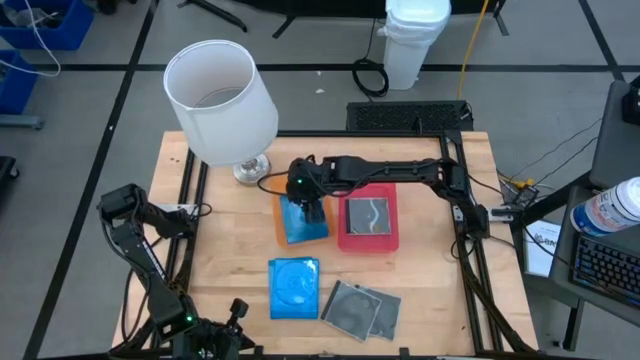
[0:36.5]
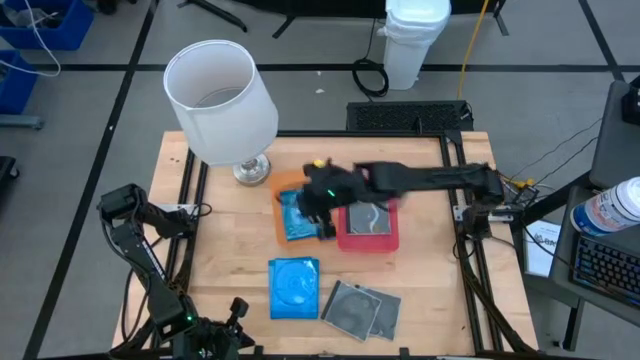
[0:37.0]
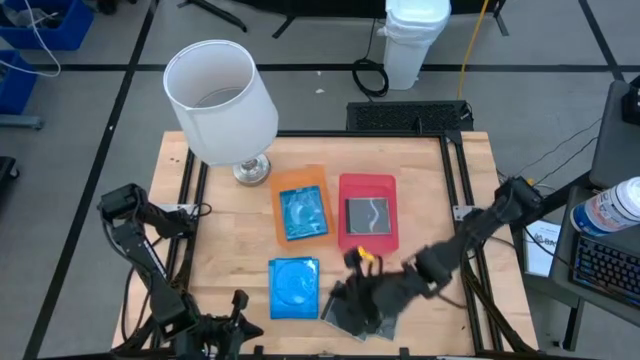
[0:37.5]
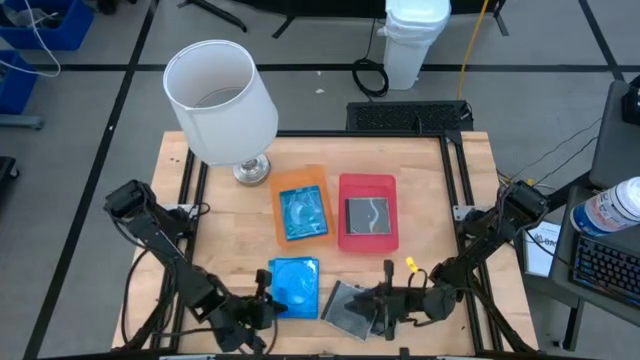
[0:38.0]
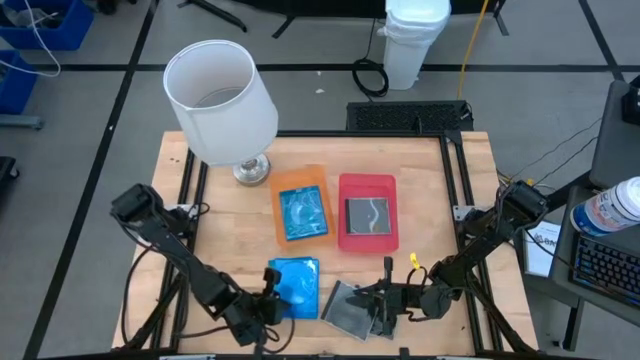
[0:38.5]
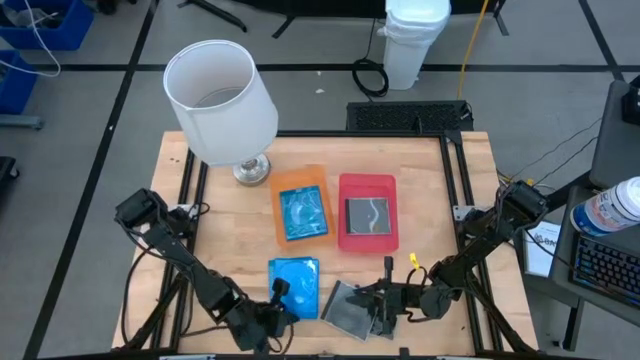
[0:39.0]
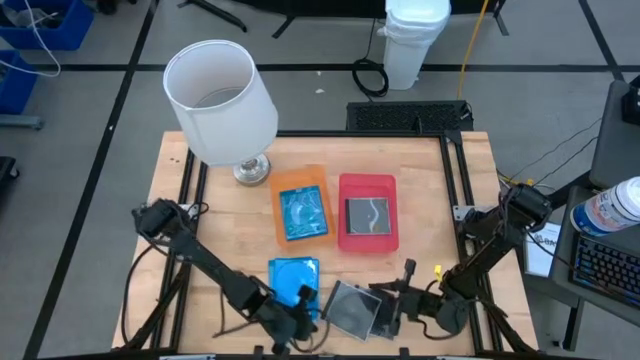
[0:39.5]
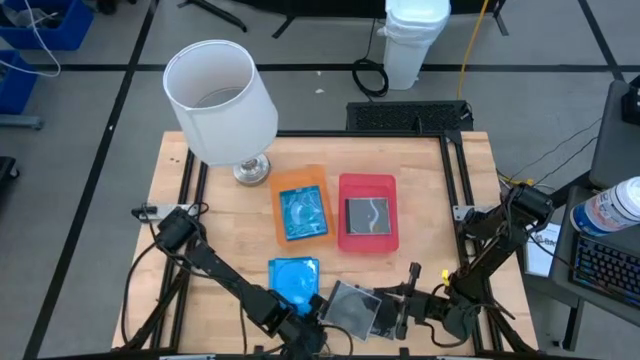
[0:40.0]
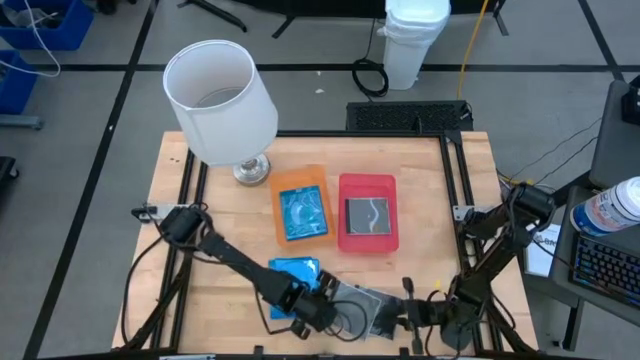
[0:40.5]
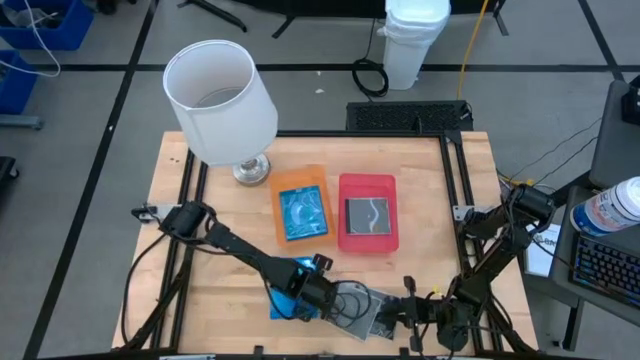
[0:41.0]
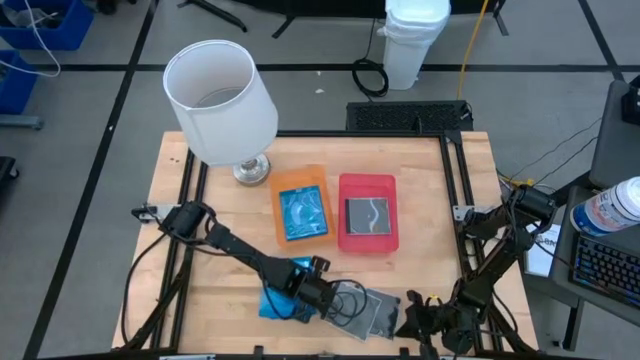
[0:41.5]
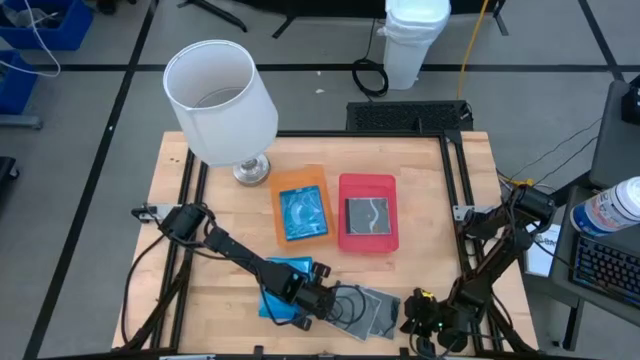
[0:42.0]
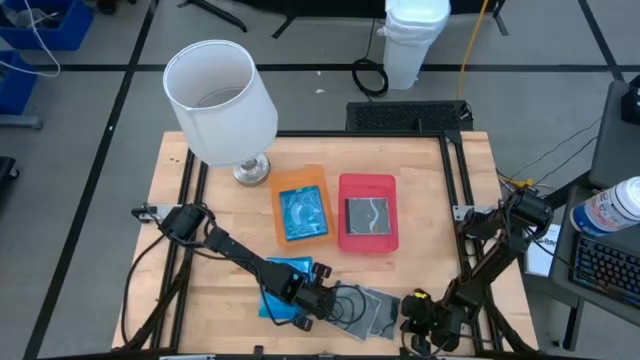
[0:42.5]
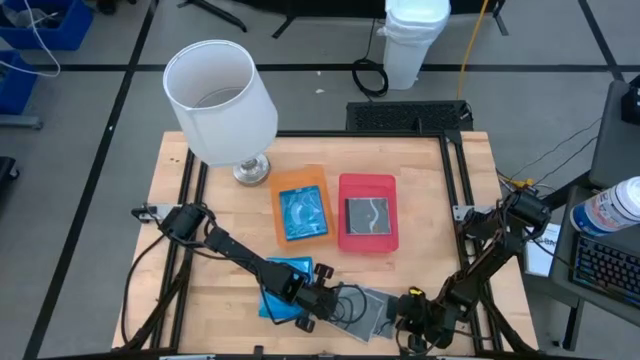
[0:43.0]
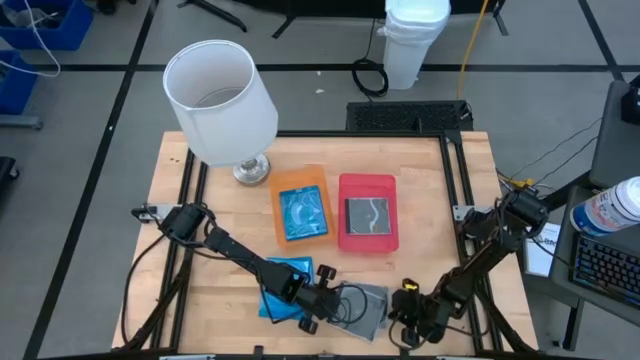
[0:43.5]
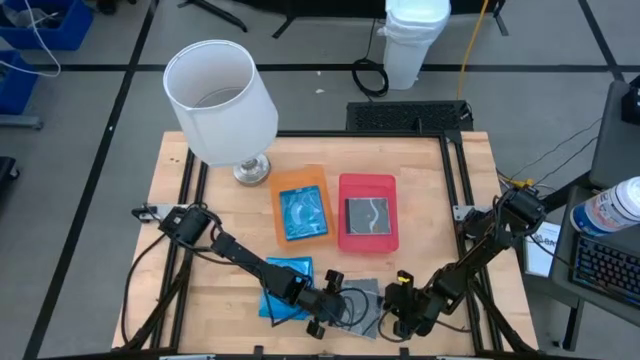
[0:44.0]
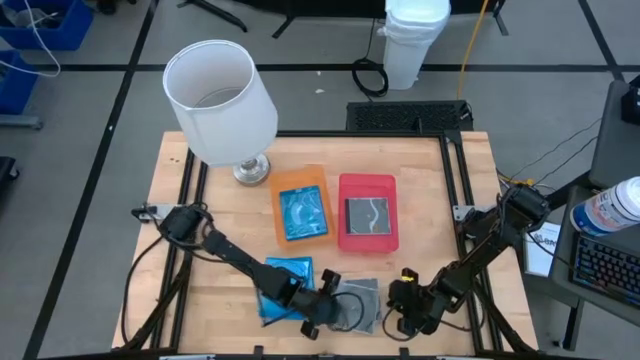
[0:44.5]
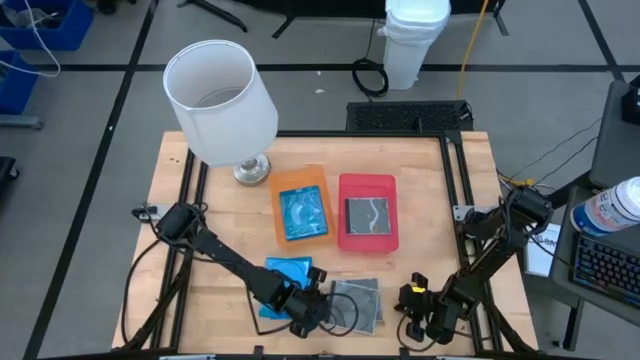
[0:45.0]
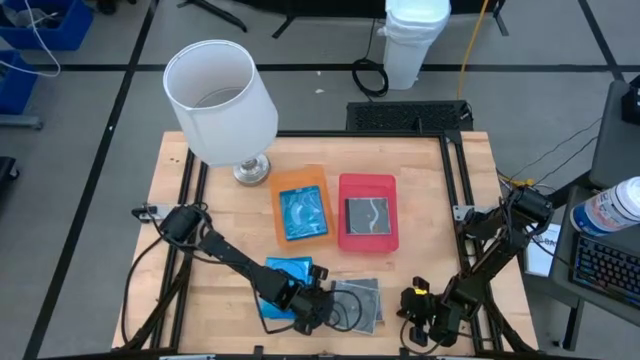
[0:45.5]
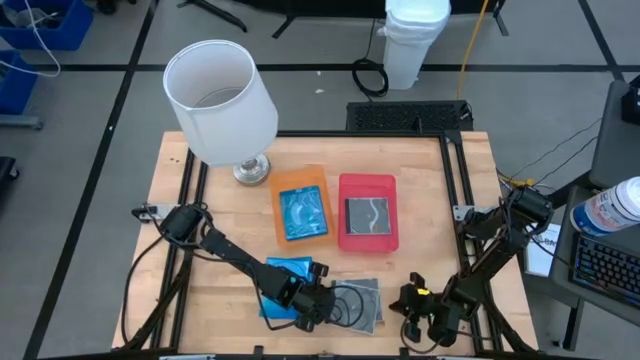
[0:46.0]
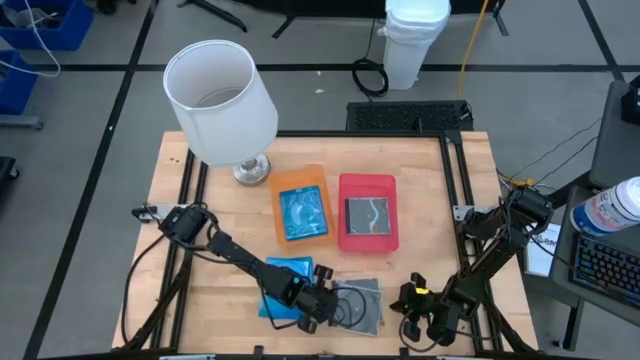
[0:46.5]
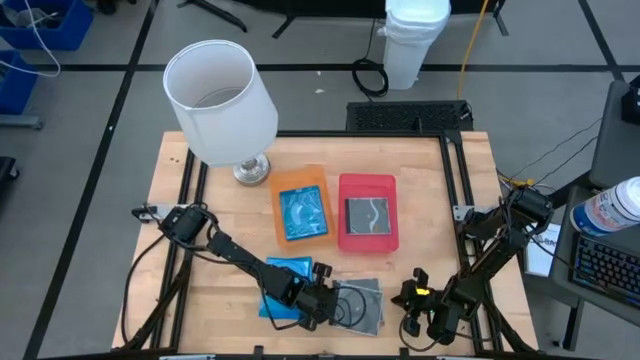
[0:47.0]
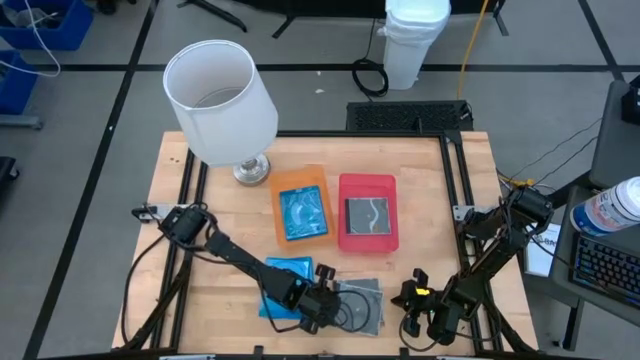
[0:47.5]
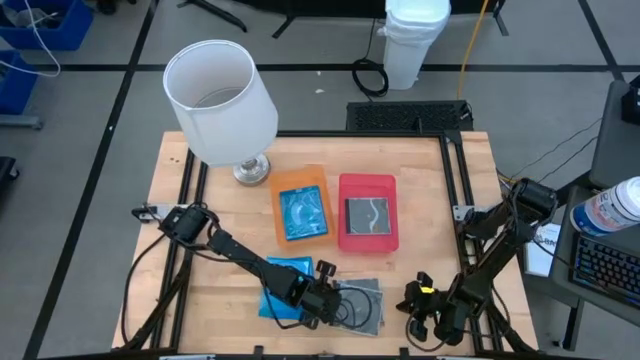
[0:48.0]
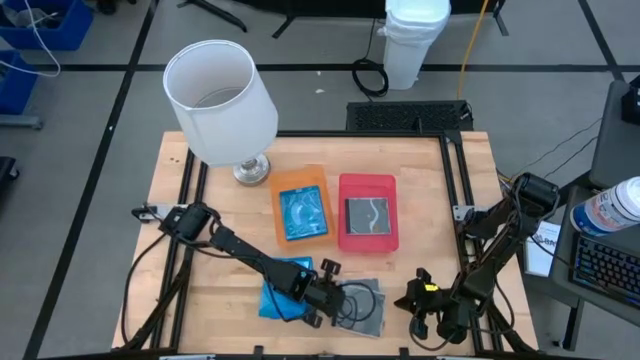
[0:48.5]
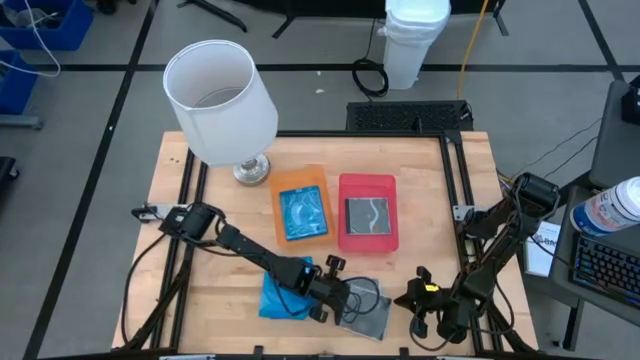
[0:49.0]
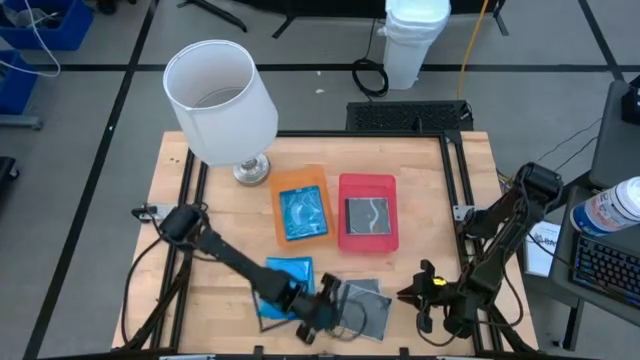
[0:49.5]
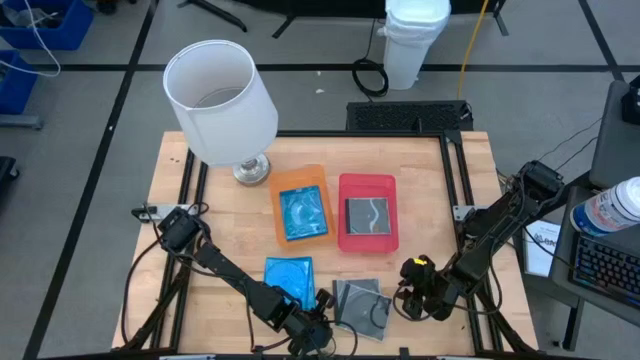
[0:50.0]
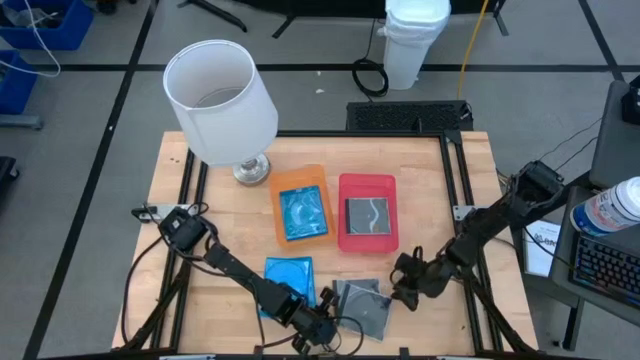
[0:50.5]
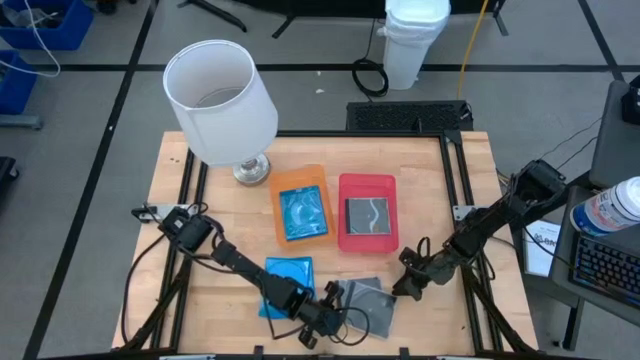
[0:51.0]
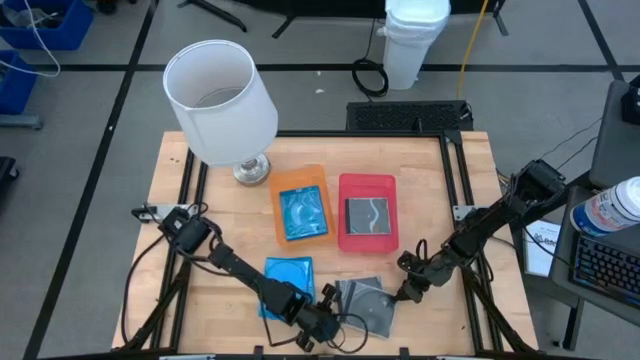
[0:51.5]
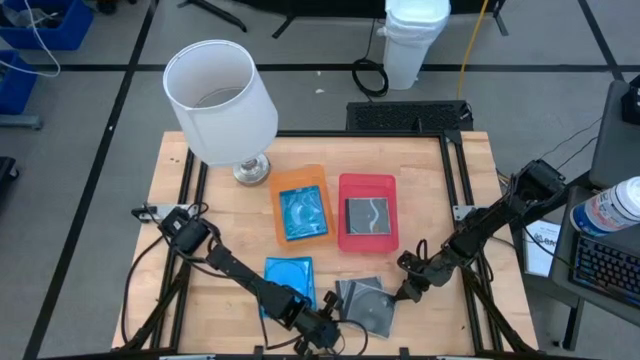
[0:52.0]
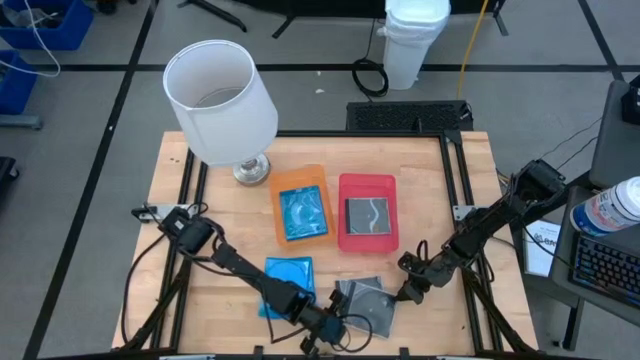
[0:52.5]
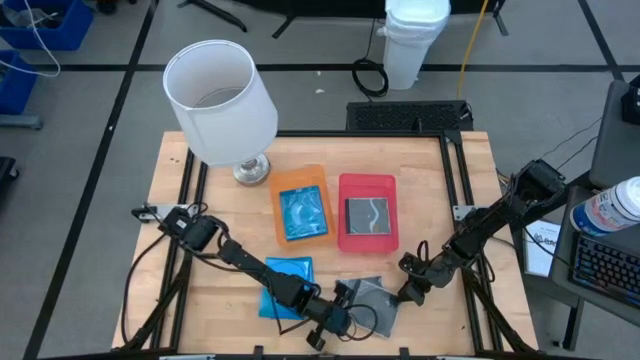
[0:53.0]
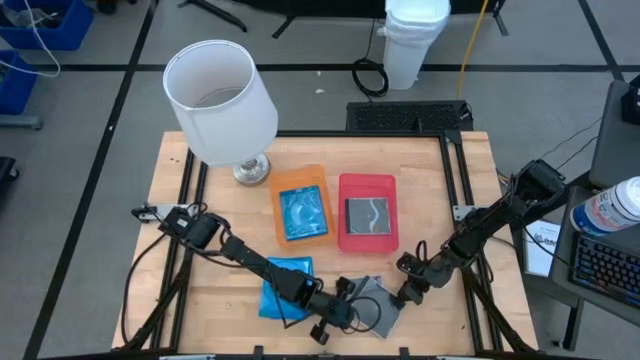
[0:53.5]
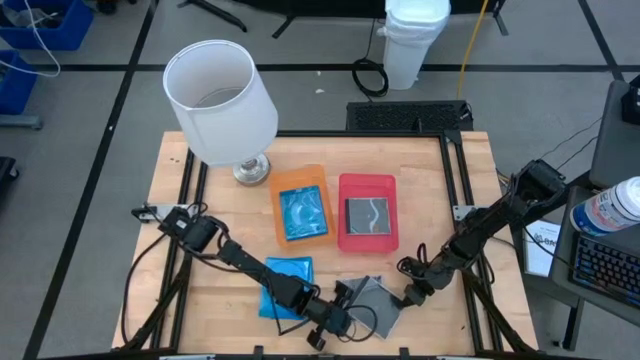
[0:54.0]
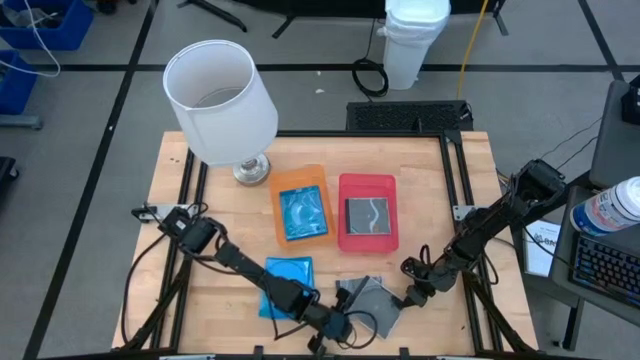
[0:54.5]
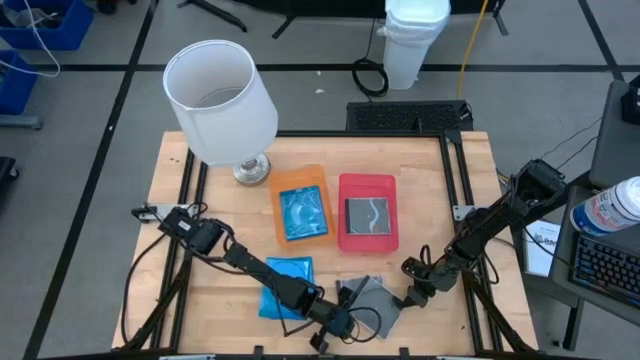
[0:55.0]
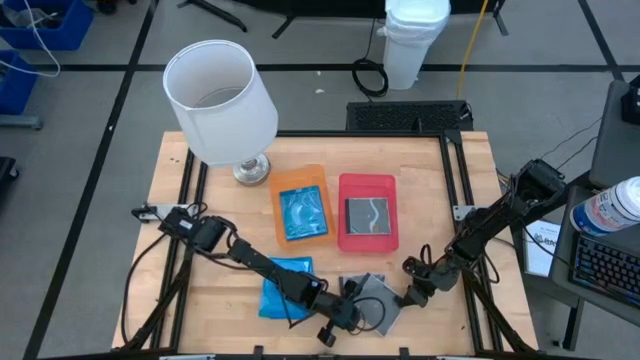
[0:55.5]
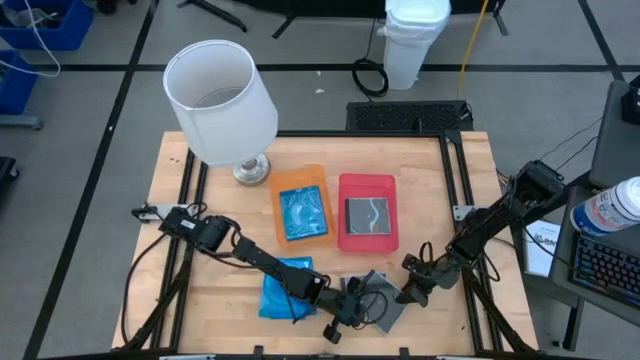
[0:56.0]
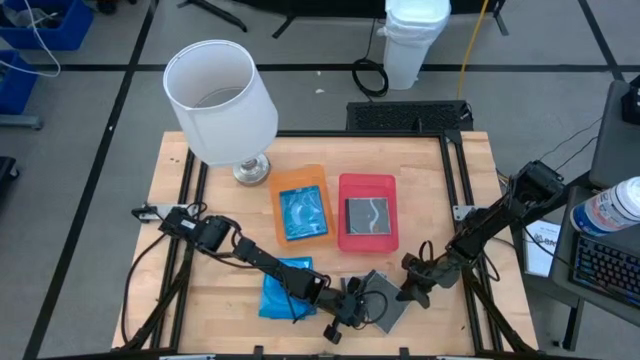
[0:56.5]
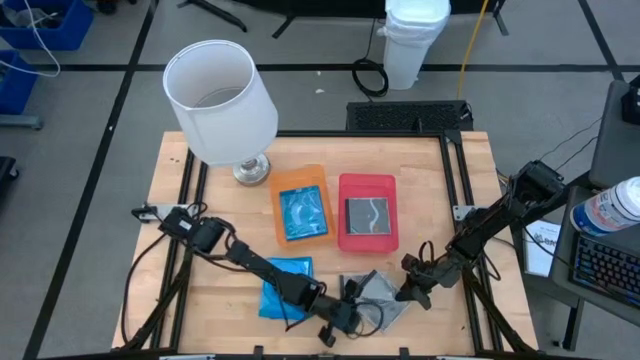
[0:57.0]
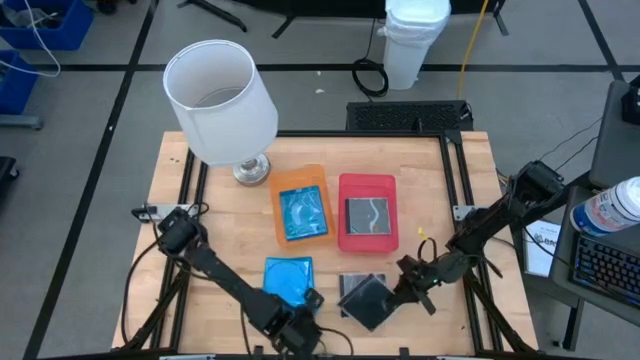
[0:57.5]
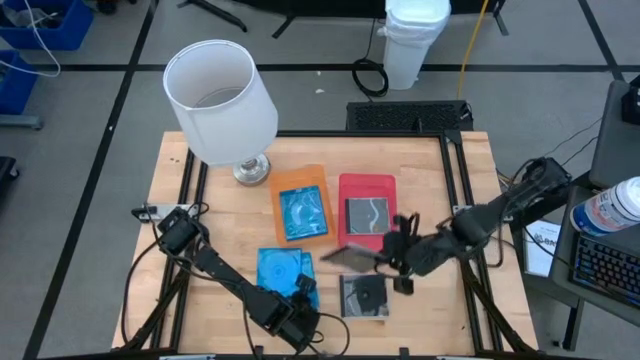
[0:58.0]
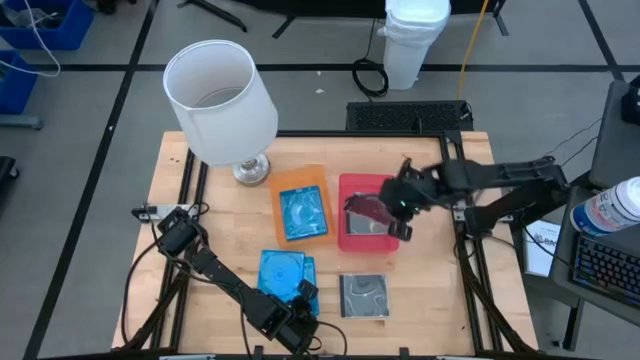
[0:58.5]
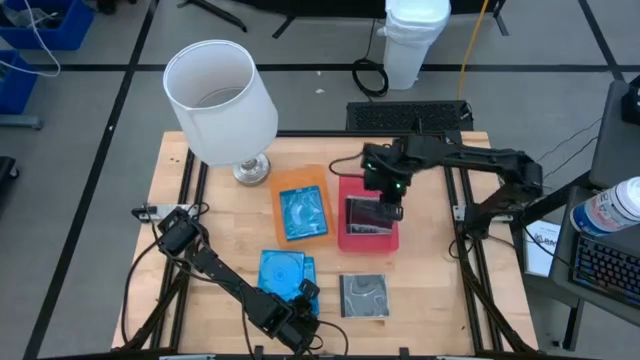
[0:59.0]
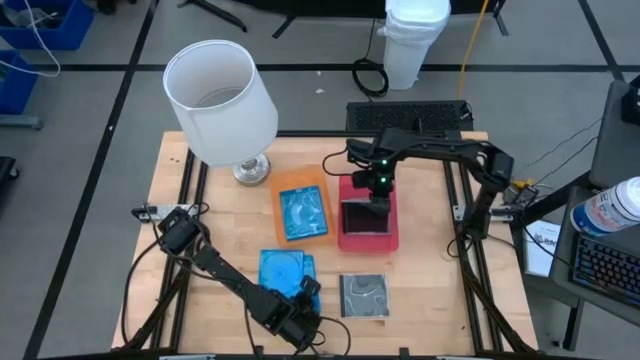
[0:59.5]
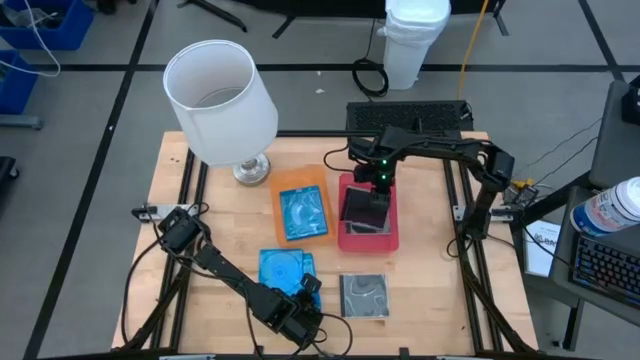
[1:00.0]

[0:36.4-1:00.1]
Task: Pick & place jewel cases by type
Put the black CD case into the pink bin
